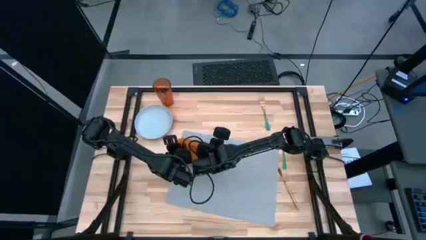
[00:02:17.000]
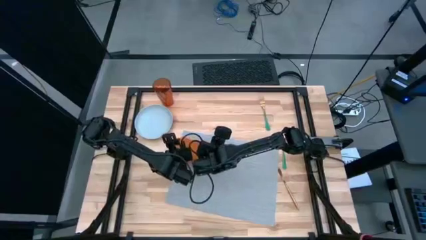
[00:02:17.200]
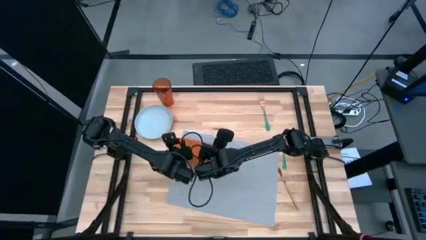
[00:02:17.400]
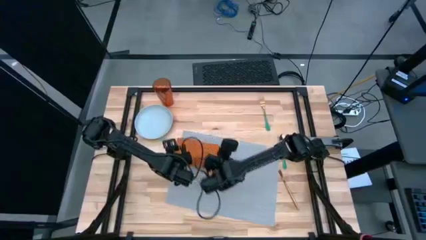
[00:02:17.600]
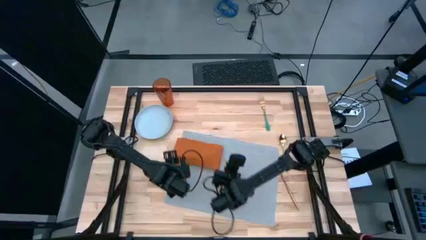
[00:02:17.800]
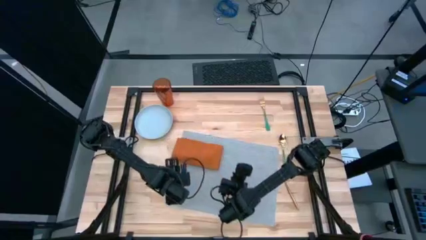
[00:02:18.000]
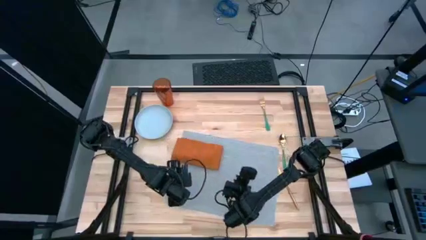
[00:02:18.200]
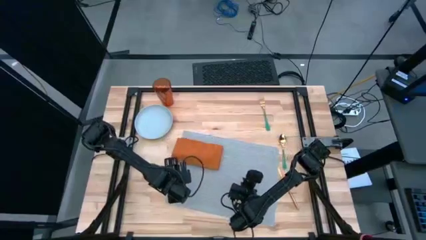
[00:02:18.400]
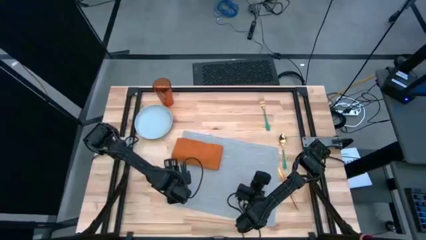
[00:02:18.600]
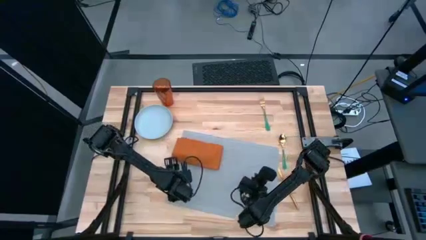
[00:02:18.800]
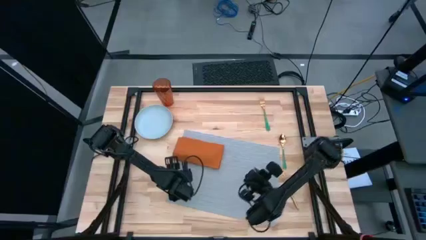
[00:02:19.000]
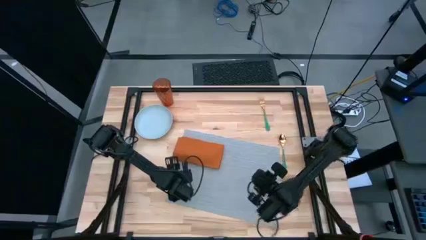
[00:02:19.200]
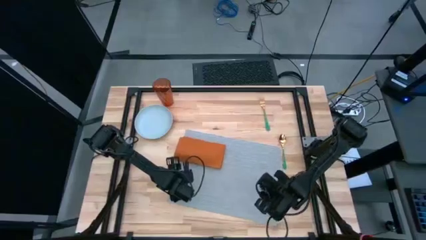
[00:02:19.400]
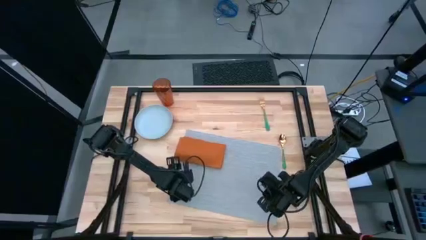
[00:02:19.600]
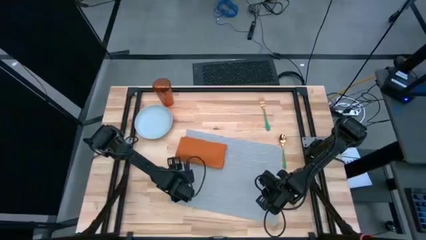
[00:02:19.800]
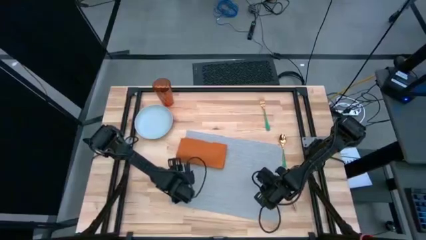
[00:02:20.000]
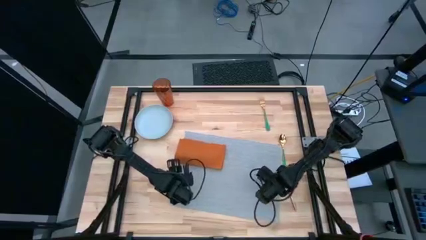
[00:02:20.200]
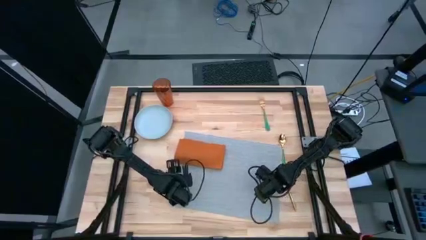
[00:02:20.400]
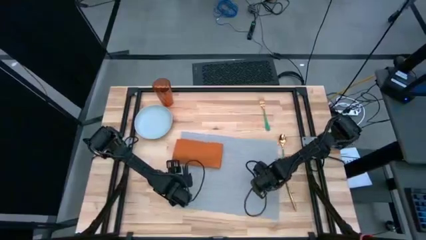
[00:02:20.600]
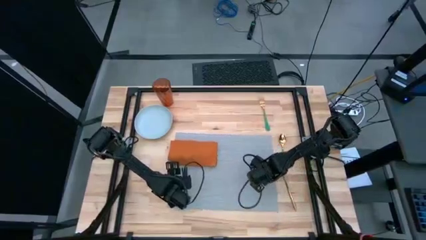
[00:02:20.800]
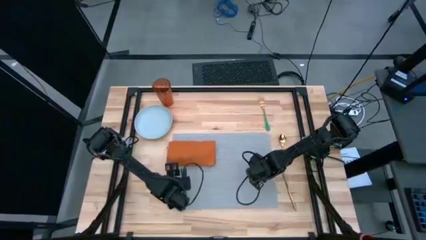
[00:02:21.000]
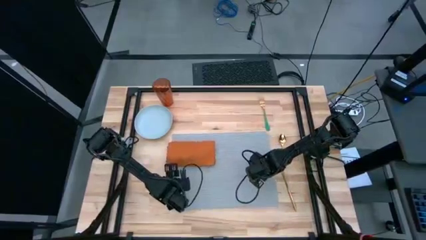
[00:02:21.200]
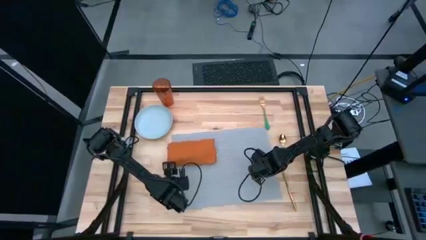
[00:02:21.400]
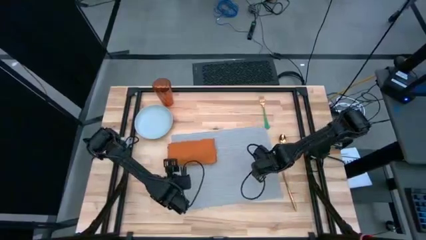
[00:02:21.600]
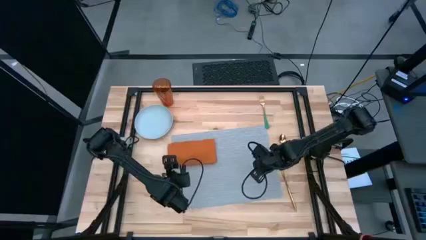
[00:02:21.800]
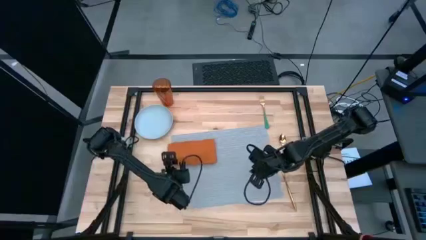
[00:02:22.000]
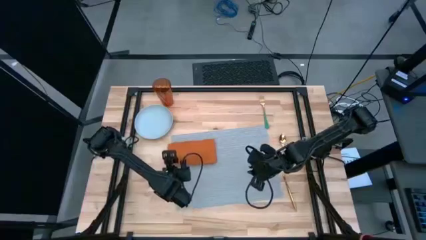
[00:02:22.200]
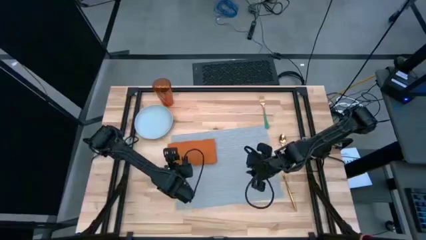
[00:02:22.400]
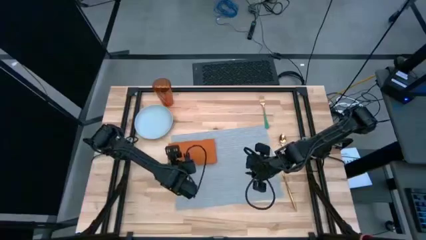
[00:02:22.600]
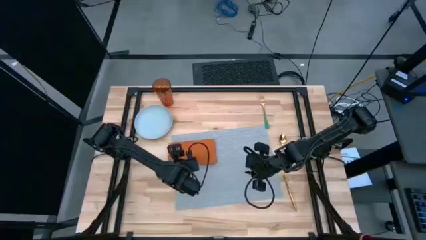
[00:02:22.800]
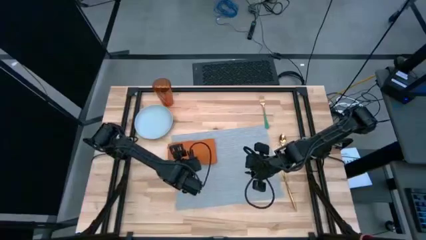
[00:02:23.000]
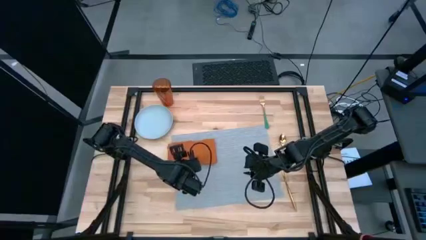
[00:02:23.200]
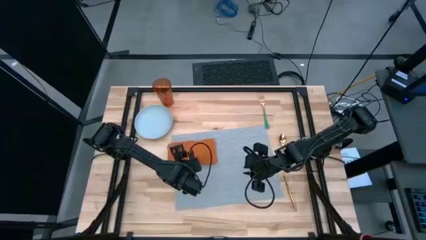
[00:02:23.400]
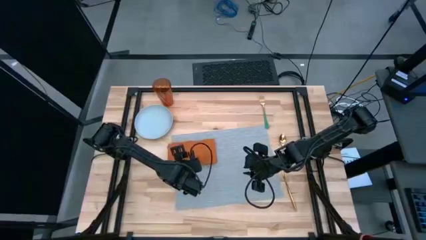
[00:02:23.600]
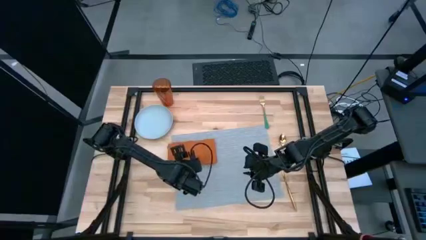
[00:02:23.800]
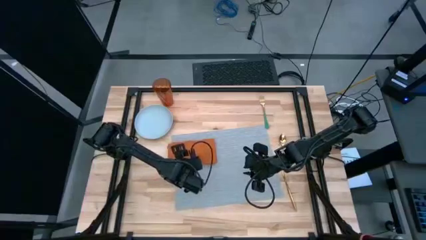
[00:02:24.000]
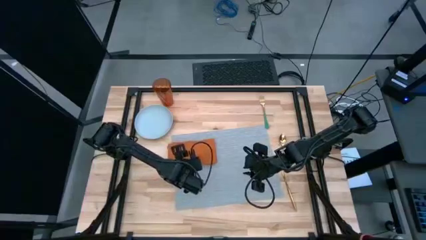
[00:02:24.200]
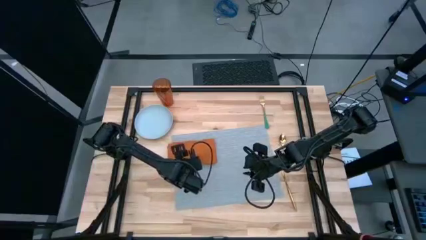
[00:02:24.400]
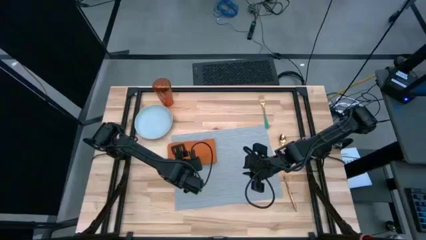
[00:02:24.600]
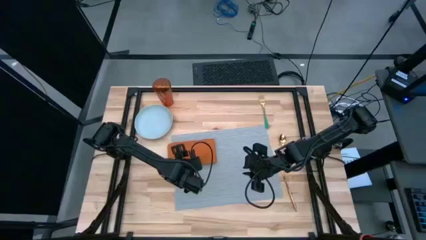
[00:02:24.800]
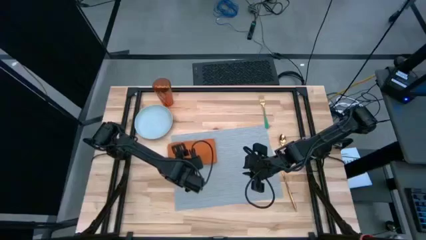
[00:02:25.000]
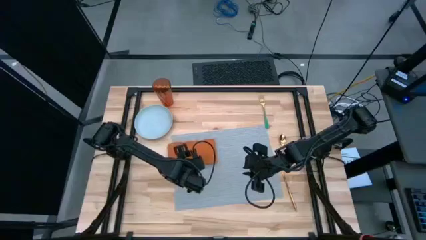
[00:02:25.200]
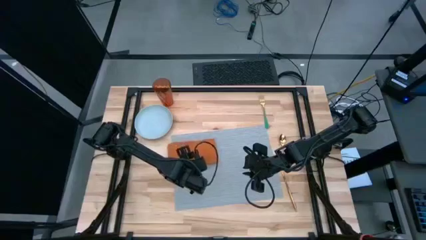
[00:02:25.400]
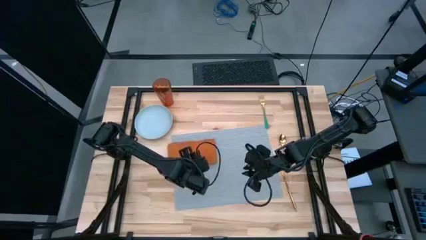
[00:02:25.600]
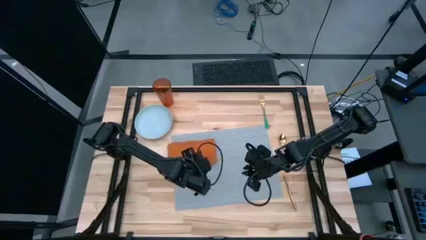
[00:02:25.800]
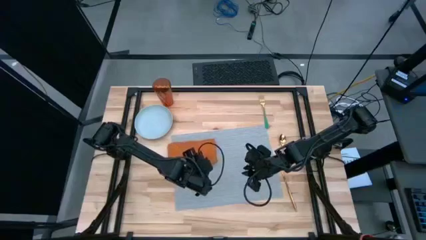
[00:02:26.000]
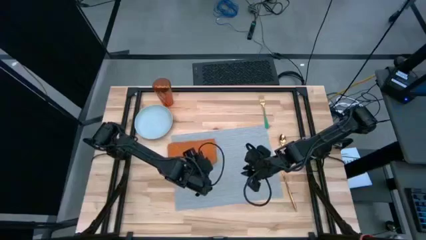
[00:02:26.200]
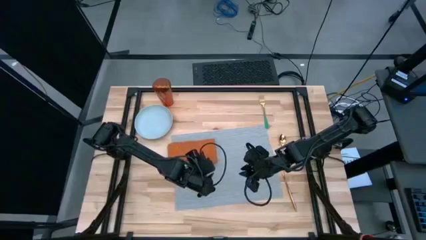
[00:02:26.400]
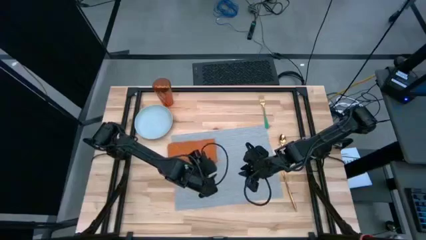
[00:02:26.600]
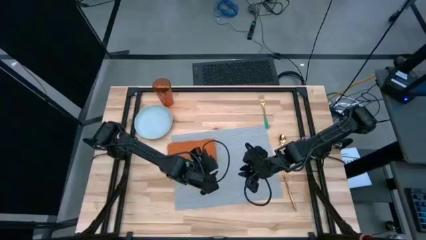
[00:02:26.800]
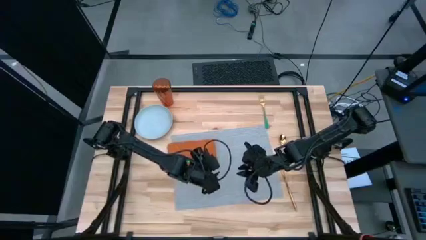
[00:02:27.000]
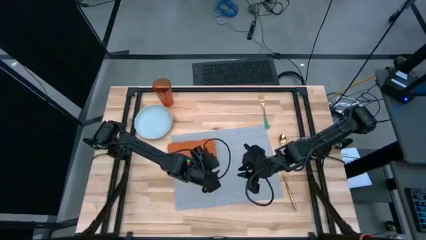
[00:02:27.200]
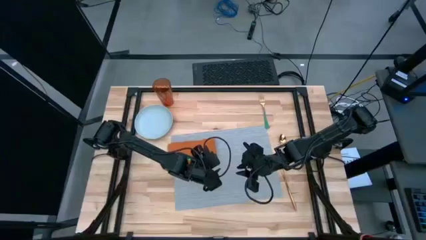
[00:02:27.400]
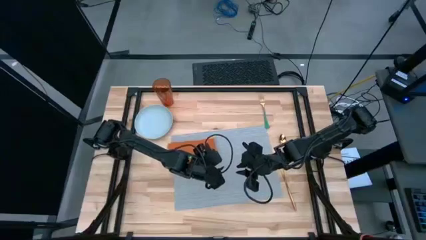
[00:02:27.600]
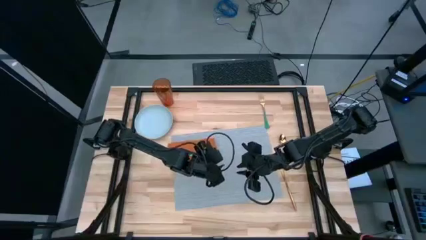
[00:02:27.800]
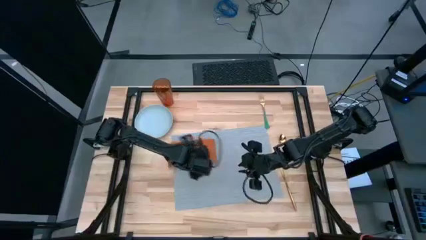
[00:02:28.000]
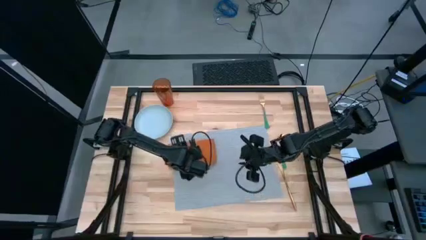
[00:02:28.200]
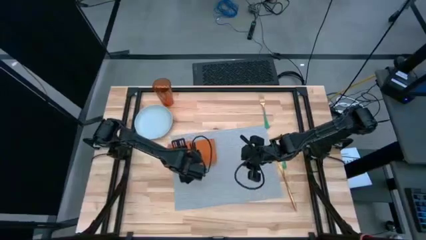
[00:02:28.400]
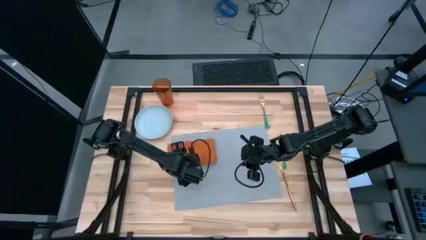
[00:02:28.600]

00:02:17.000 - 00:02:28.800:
Task: Set table place
Adjust the placemat

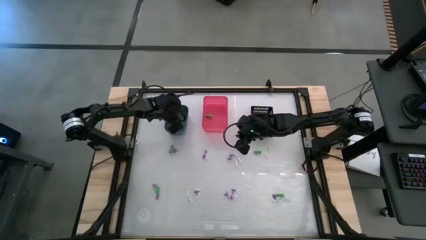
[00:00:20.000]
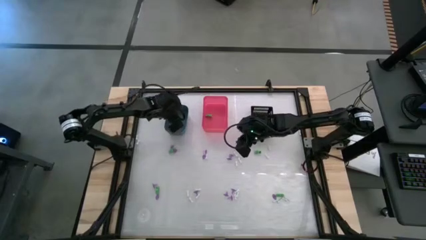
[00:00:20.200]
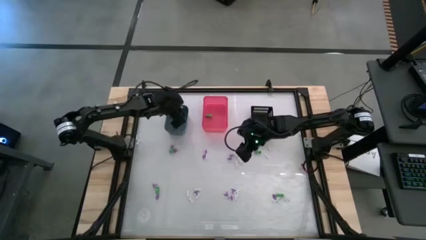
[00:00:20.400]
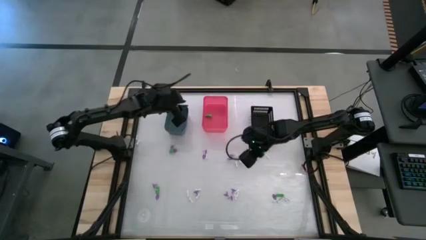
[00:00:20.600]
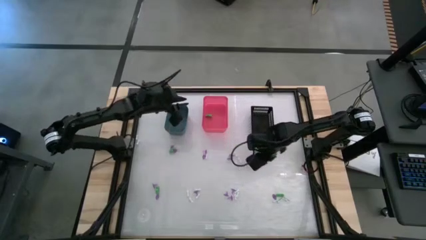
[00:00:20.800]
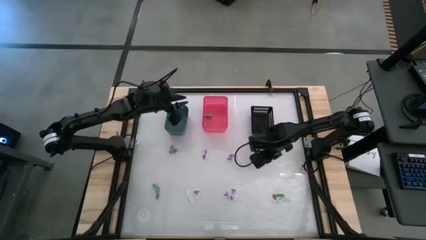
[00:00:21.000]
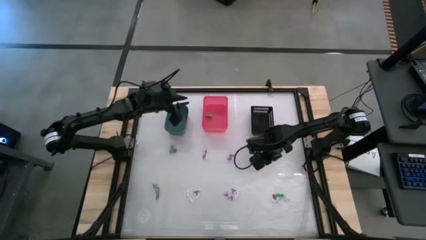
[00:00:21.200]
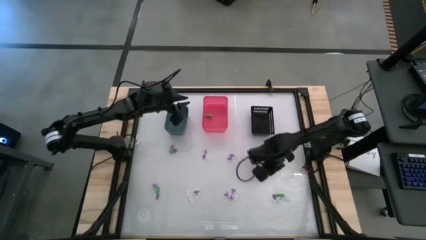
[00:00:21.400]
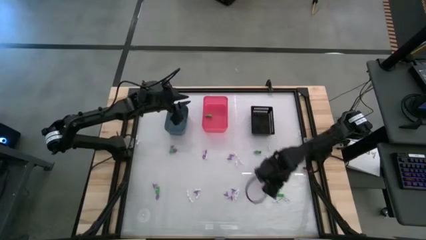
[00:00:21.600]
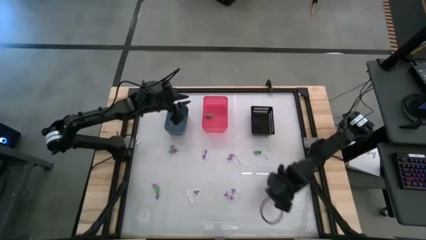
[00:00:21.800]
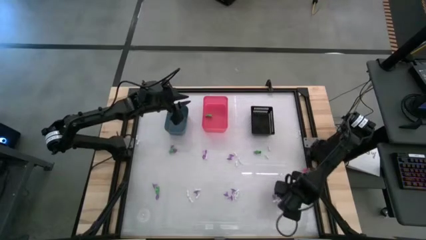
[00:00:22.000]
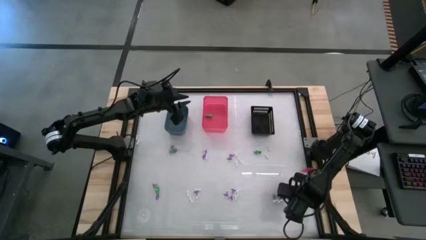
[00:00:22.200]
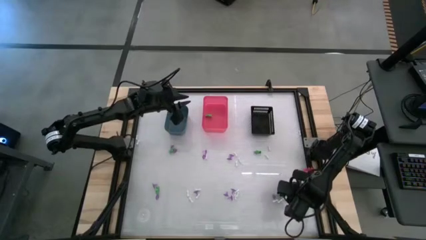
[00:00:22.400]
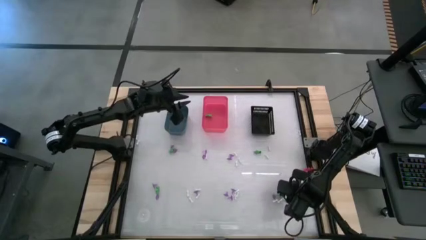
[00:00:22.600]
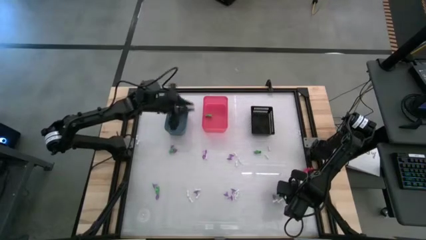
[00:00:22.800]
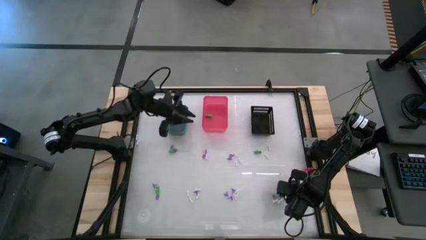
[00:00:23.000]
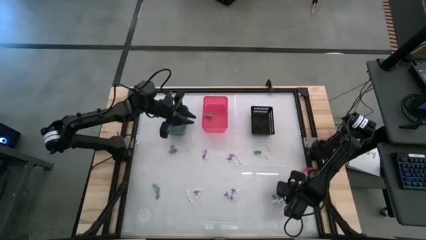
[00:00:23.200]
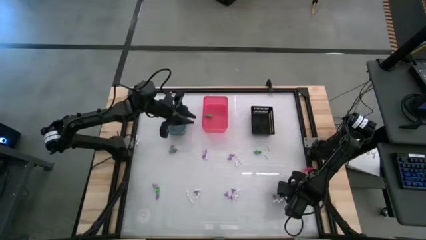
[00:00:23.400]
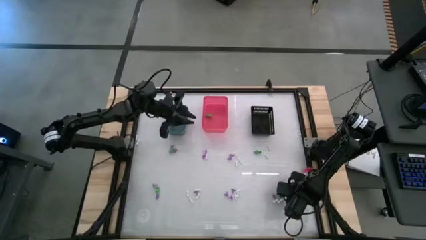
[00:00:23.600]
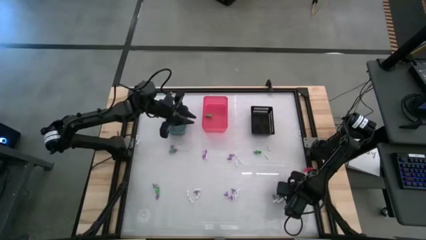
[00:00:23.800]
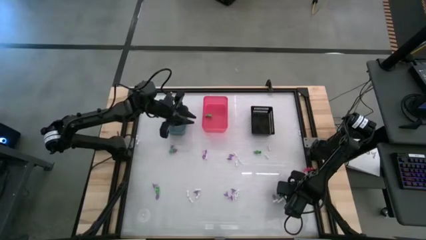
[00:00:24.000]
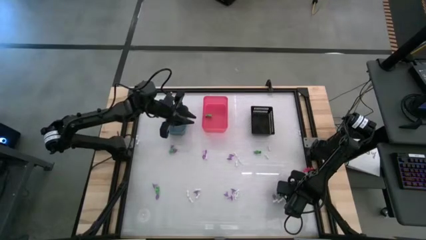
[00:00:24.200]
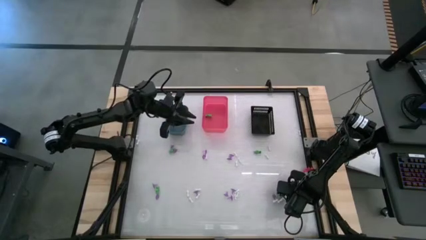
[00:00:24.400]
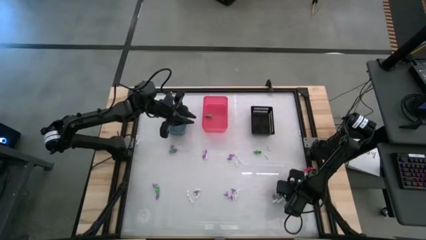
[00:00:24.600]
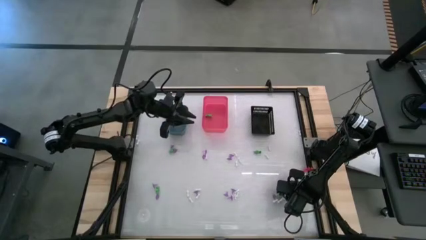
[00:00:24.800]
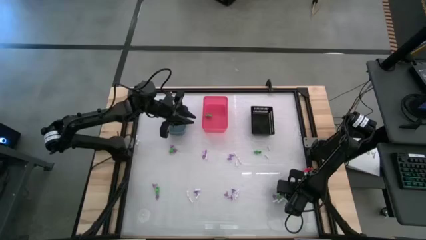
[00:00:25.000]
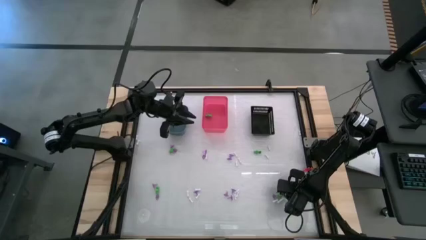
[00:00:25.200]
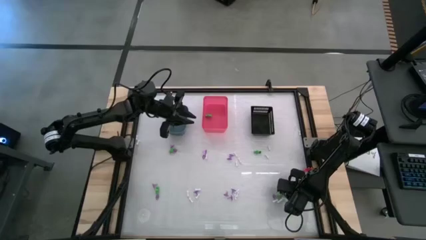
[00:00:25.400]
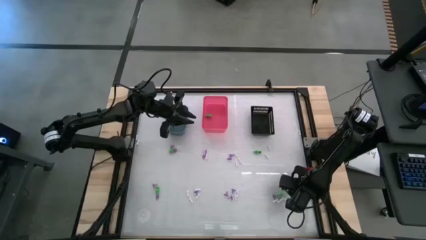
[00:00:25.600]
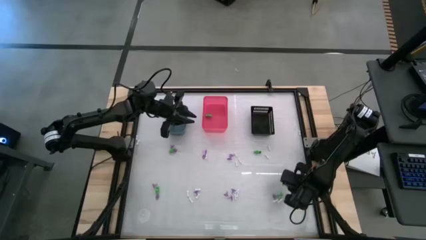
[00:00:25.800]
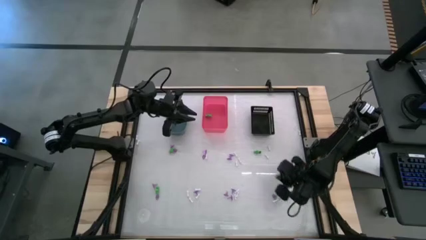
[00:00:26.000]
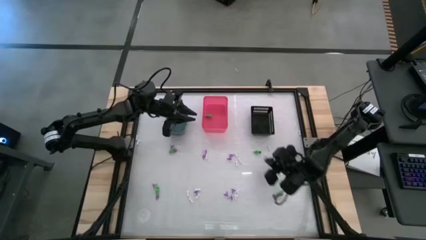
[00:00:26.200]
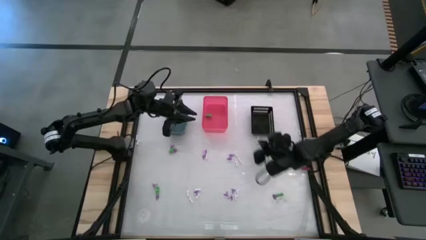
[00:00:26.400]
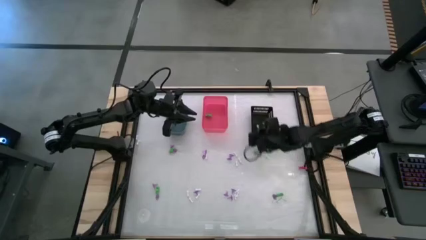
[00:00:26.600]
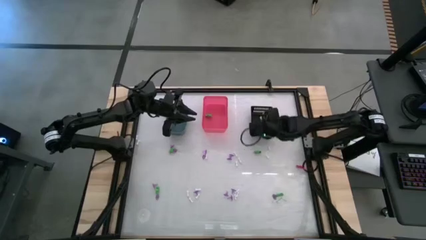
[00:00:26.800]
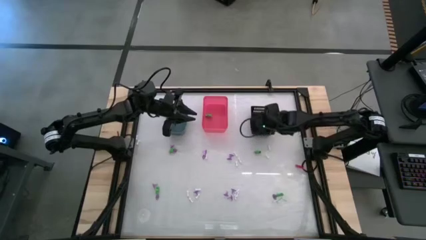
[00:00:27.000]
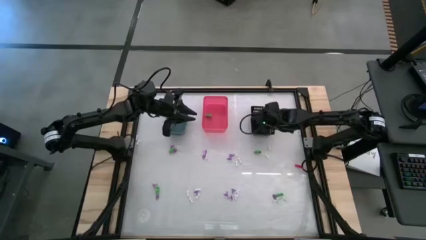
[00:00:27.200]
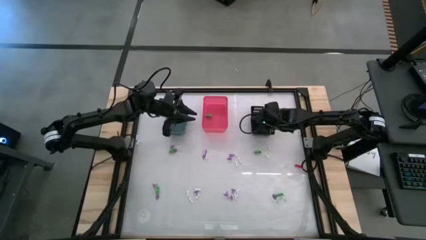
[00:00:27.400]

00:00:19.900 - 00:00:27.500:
Task: Sort Halloween decoration
Put the white bone toy into the black bin
